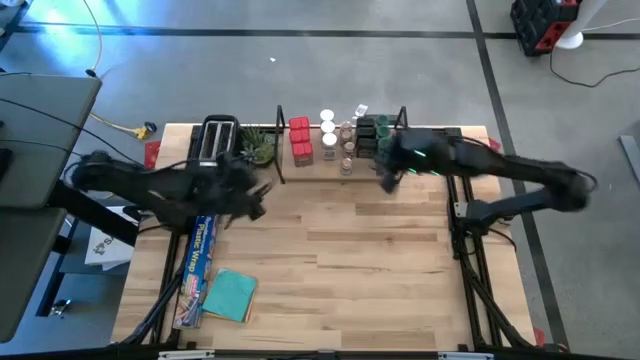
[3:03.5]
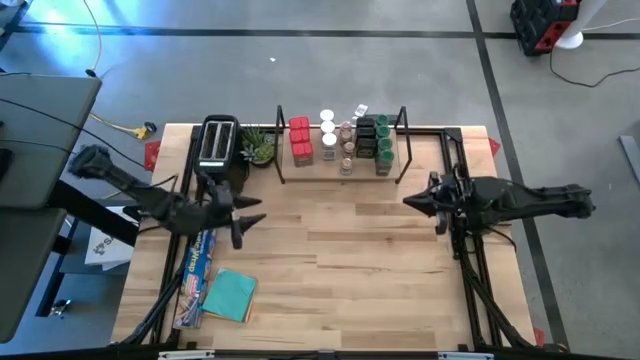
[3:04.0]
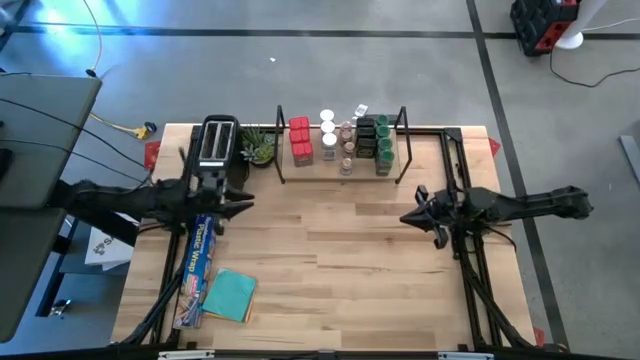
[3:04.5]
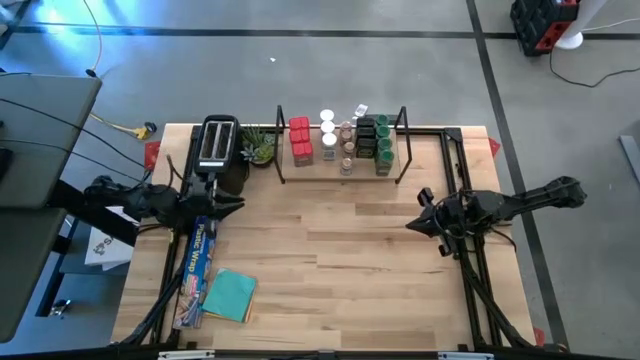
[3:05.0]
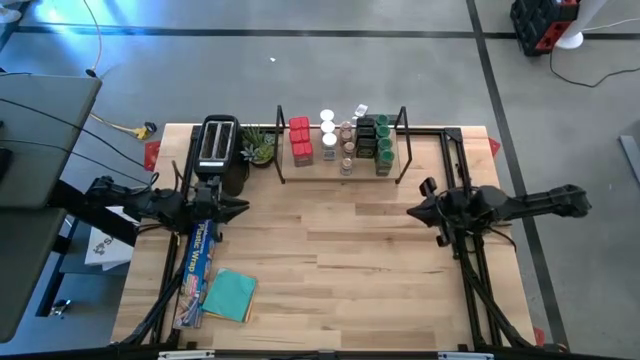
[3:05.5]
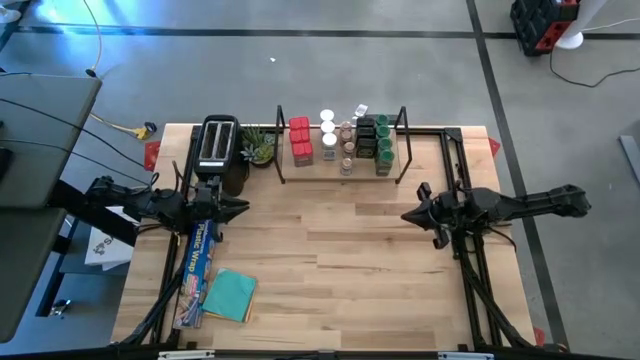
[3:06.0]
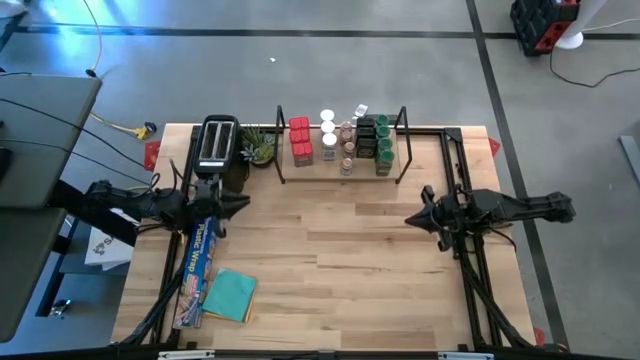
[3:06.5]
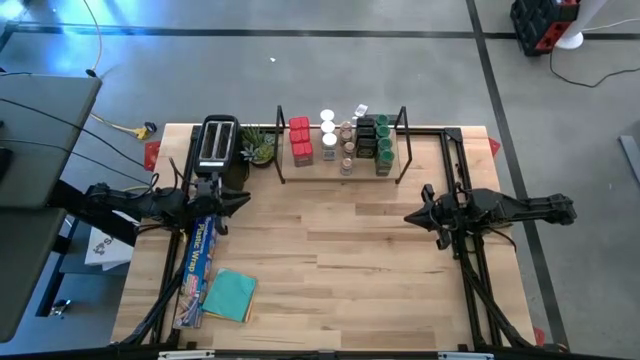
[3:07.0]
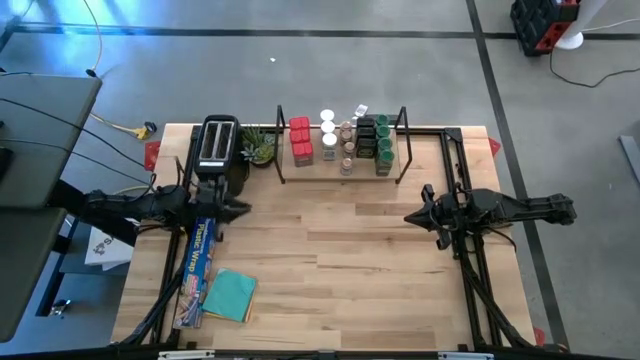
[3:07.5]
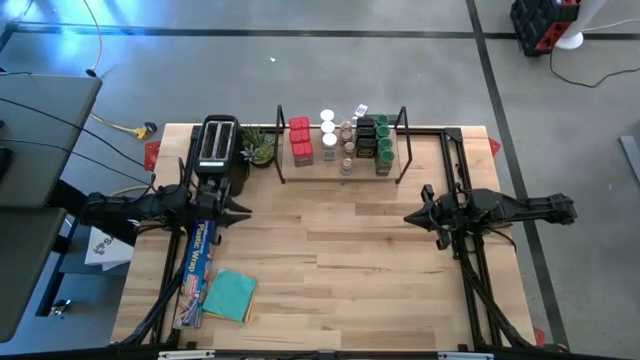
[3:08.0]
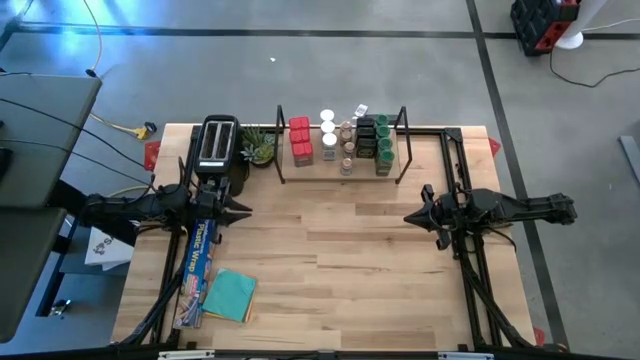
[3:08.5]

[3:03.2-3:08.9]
Task: Shelf spices
Return to Home Position

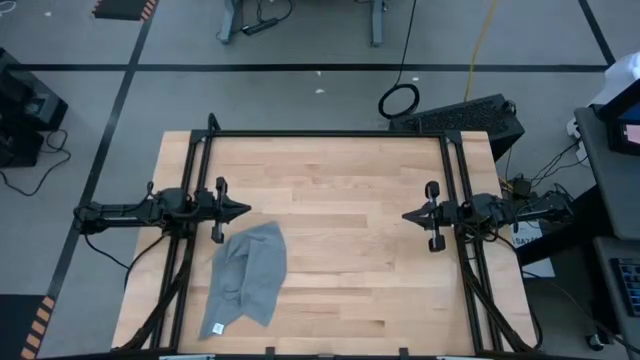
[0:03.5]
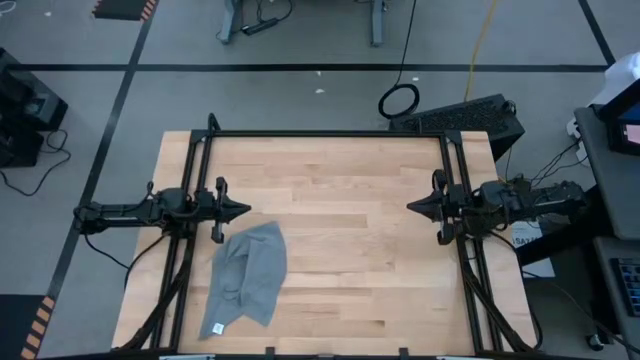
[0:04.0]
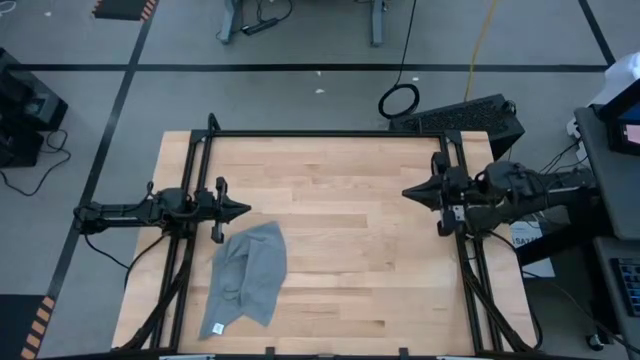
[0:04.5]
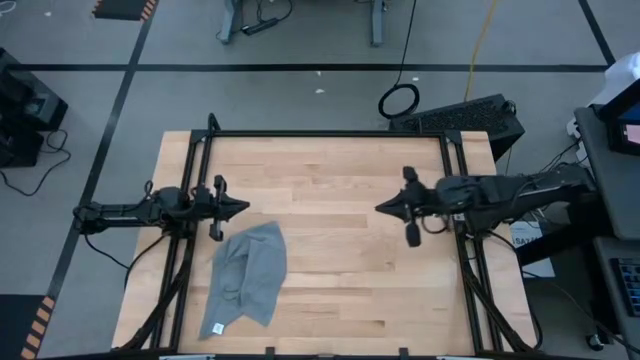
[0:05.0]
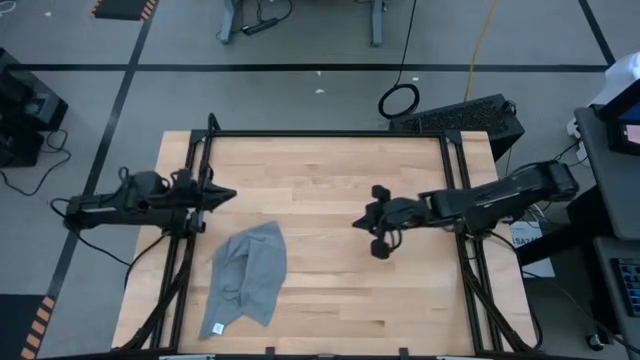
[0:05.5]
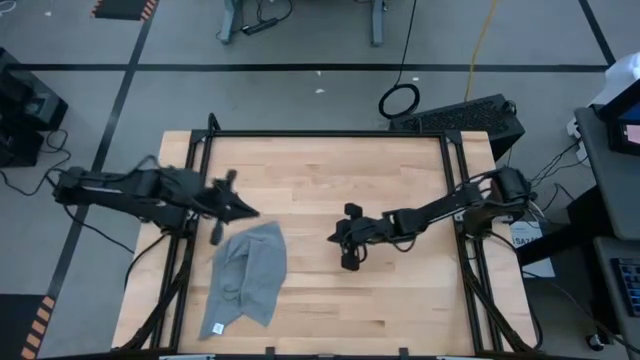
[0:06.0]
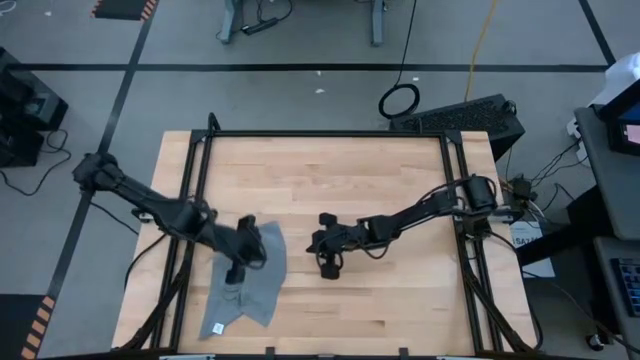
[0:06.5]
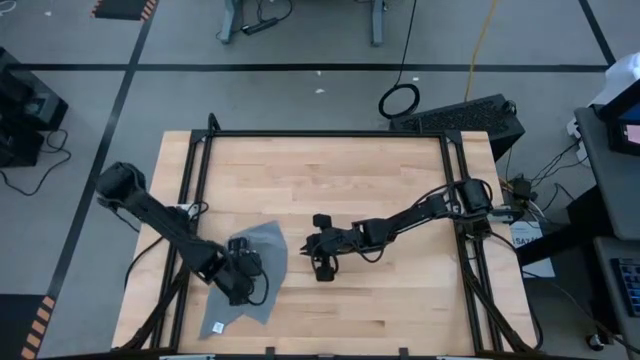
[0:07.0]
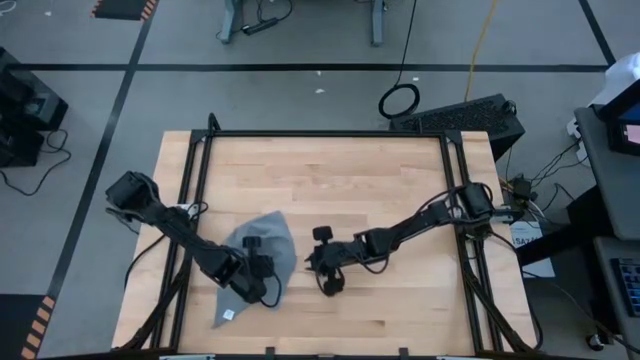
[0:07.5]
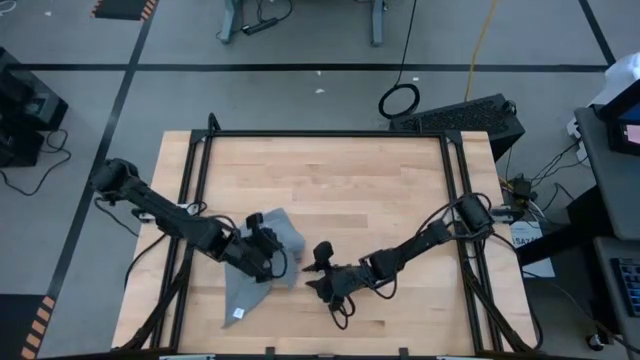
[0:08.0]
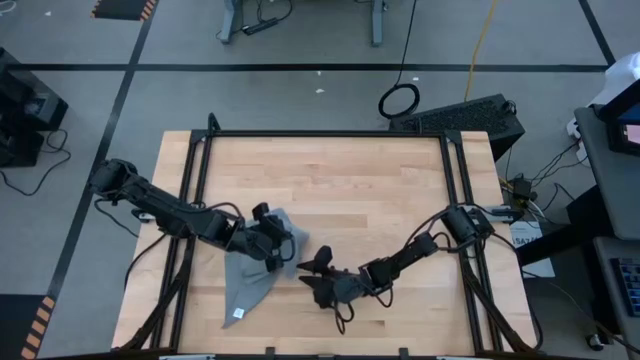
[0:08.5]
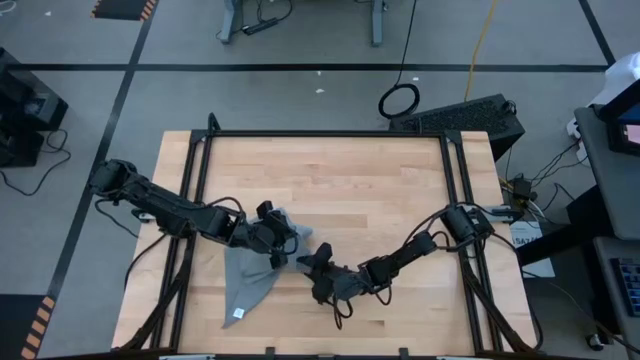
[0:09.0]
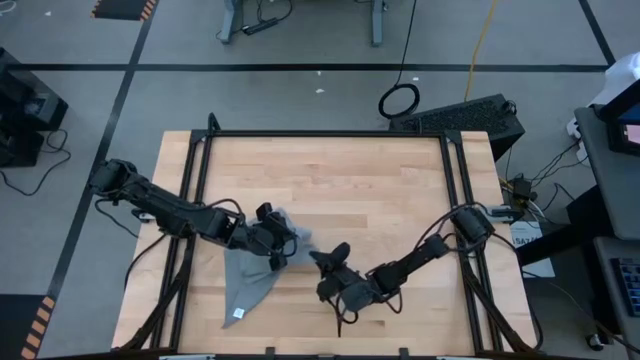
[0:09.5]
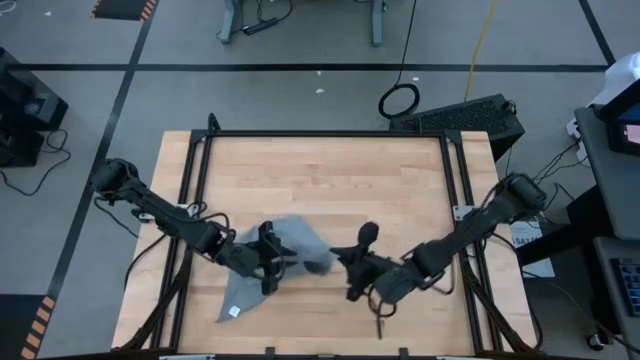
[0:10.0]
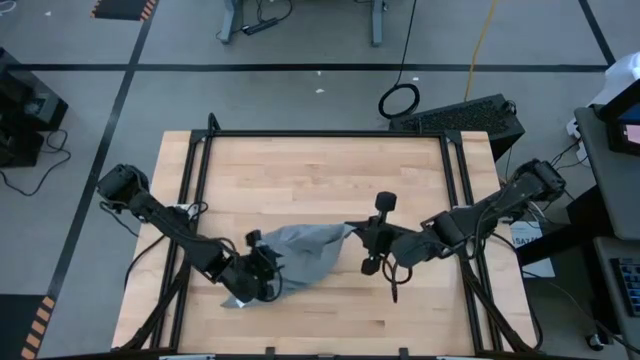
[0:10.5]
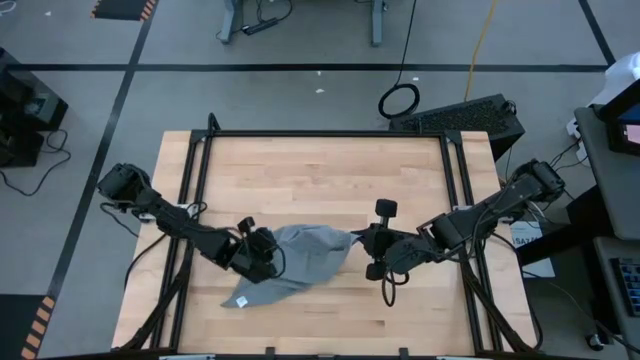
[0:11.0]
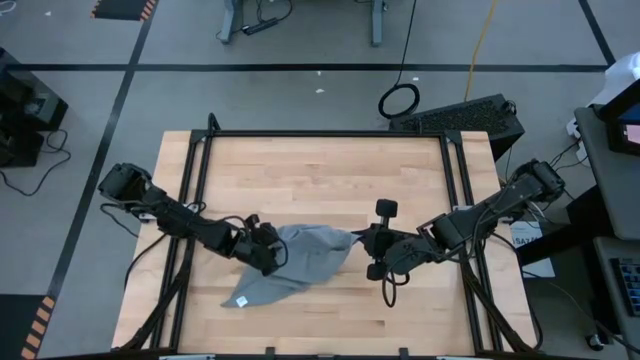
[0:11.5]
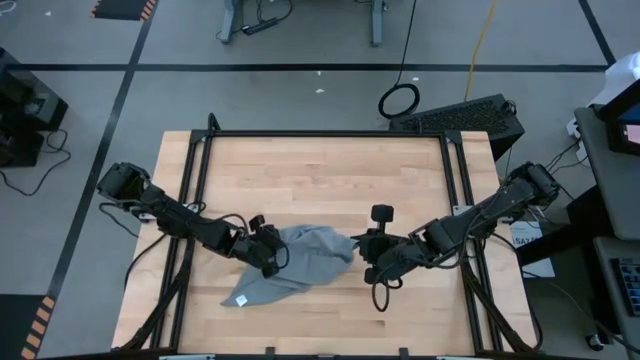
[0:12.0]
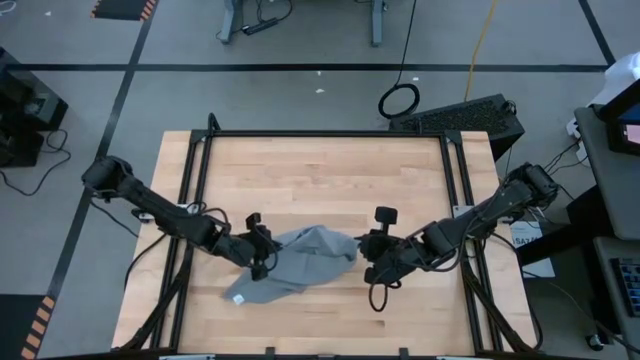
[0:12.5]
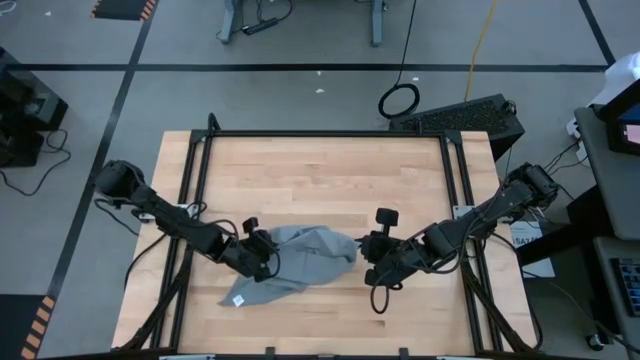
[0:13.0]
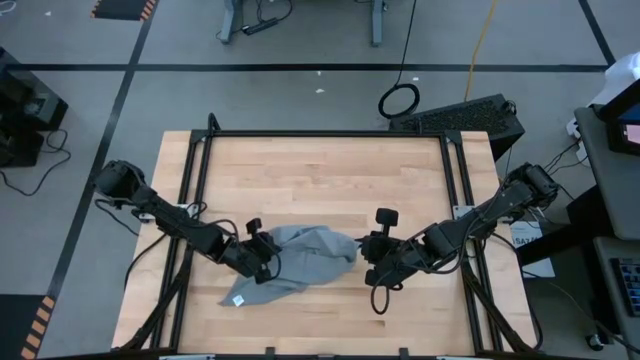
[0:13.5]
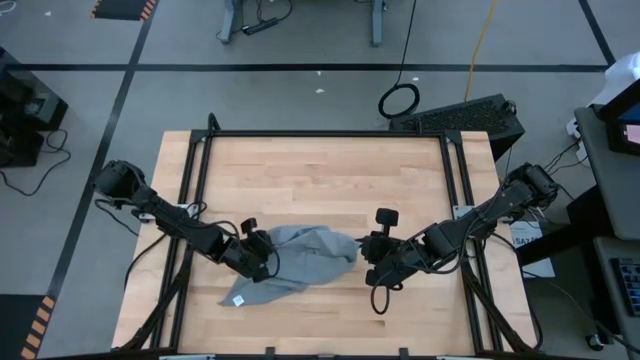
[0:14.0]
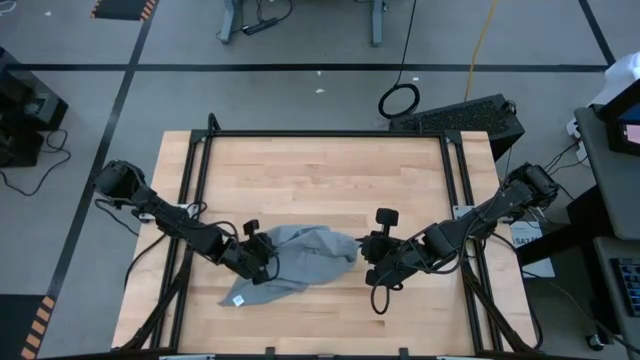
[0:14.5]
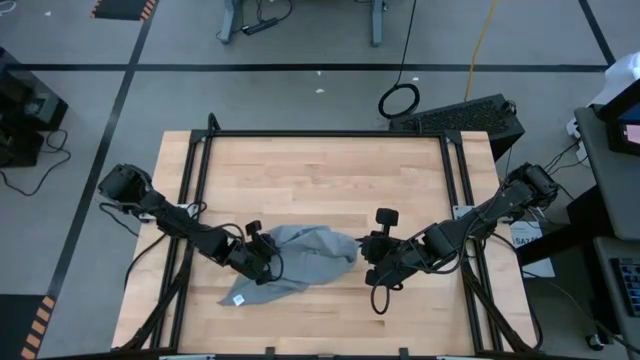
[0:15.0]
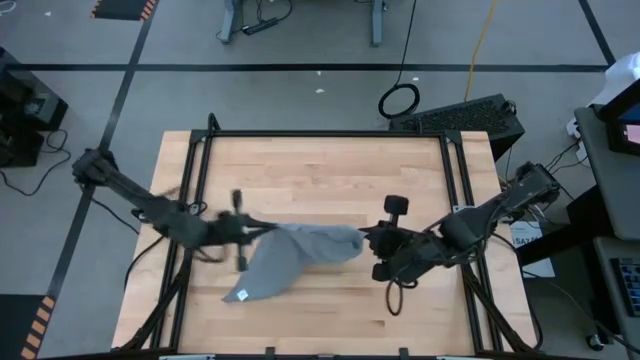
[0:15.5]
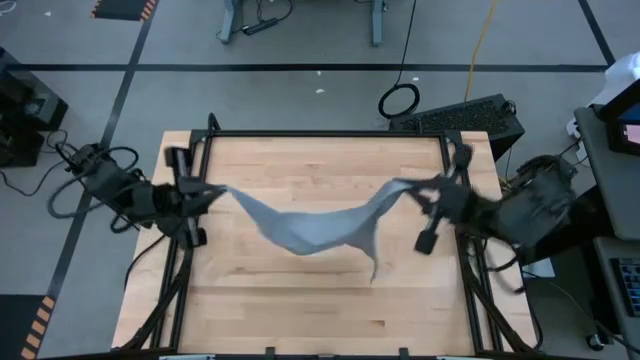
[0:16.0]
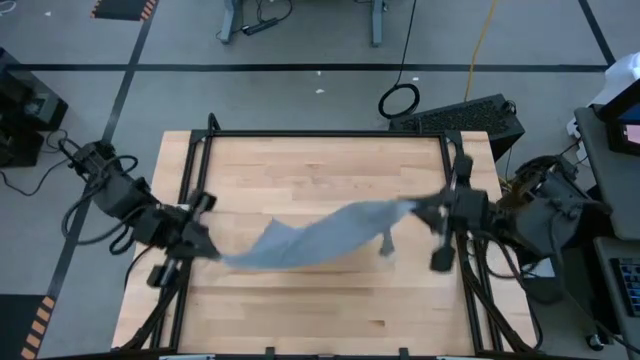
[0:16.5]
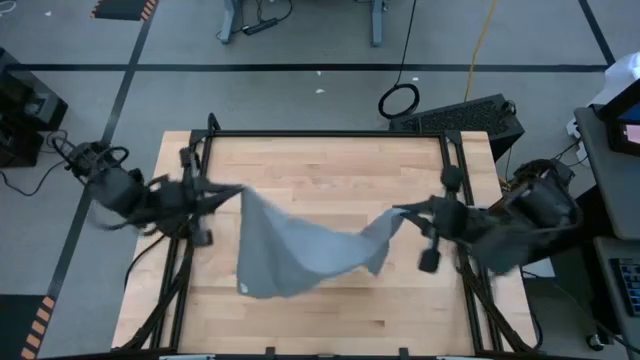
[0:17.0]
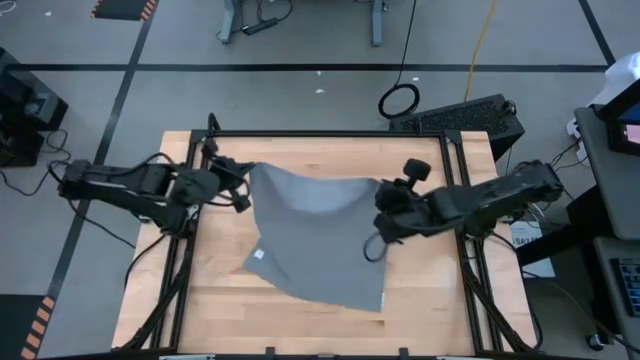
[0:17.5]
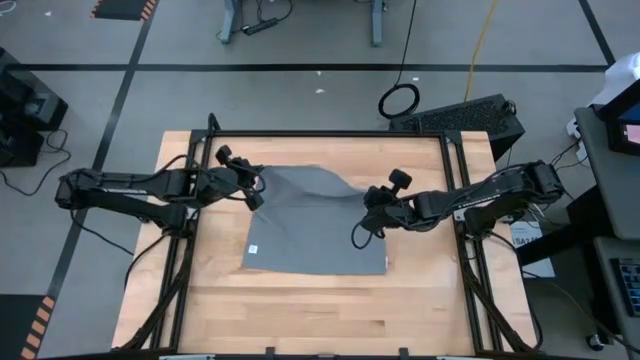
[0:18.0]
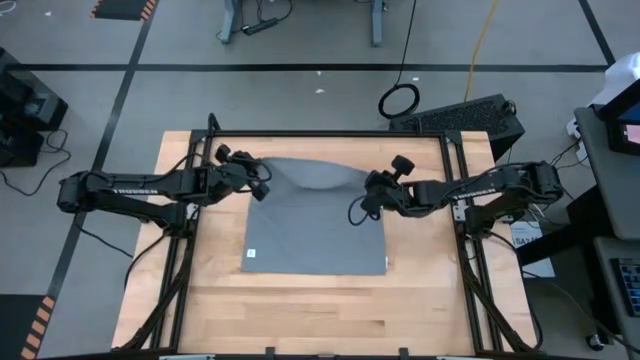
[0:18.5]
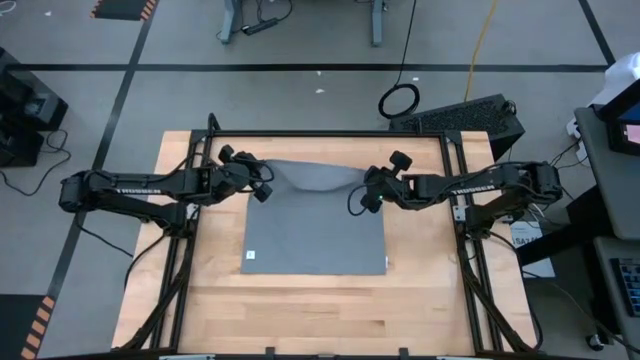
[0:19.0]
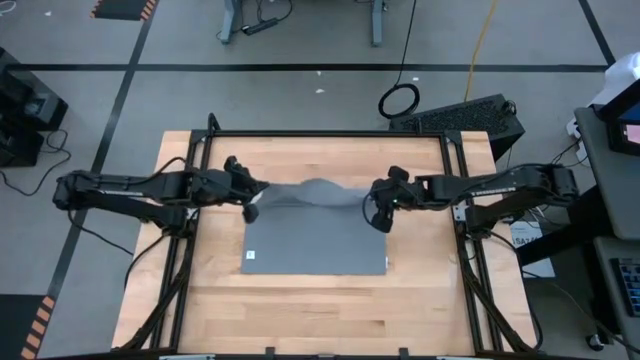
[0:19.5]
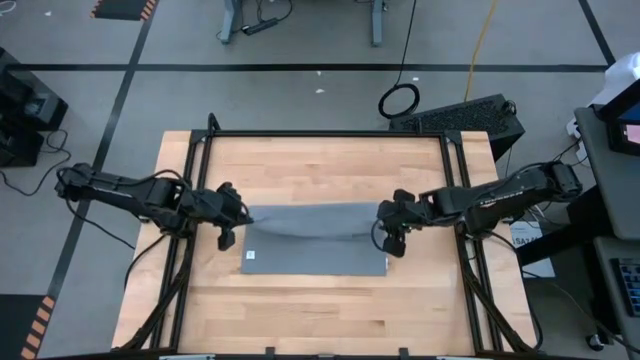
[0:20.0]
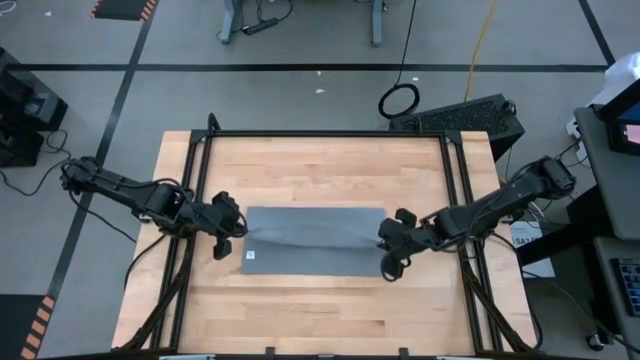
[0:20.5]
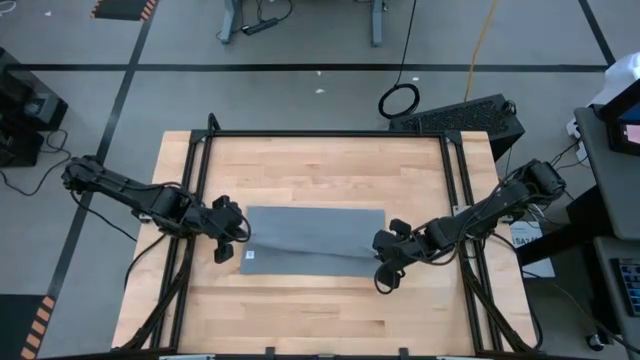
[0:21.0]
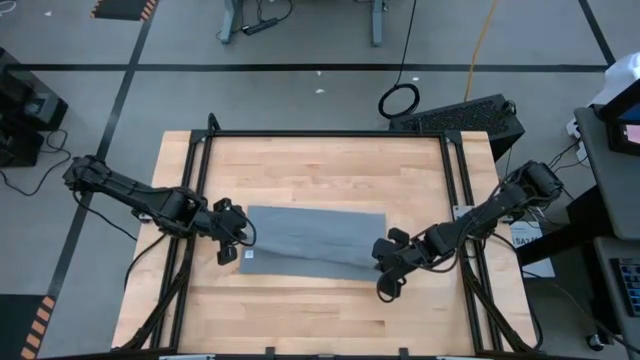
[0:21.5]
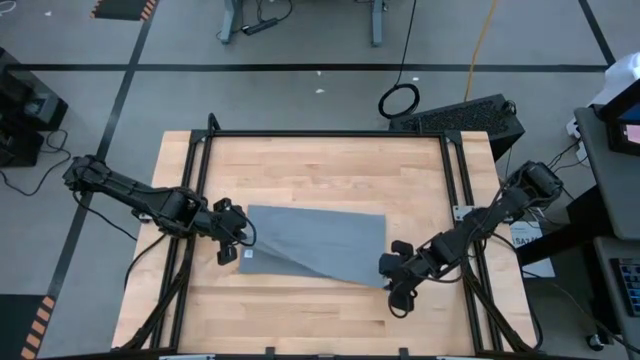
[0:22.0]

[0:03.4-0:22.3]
Task: Roll towel
Roll the gray towel
